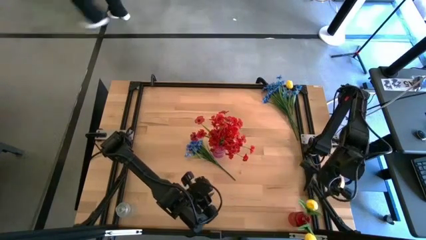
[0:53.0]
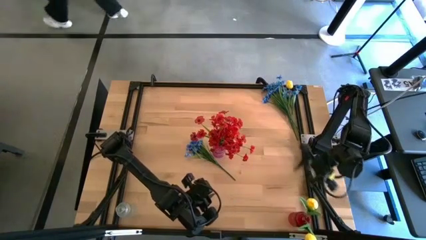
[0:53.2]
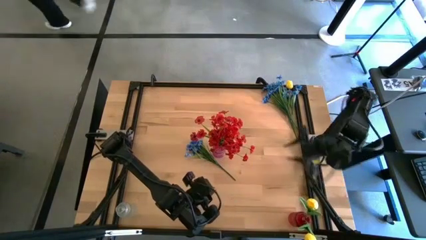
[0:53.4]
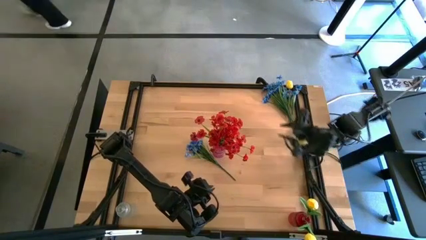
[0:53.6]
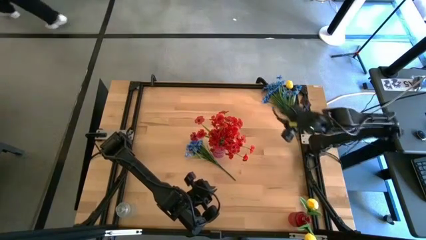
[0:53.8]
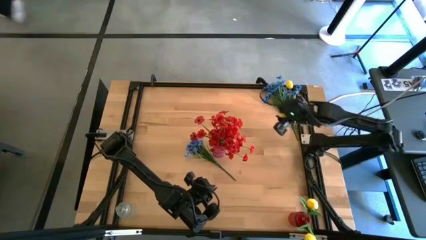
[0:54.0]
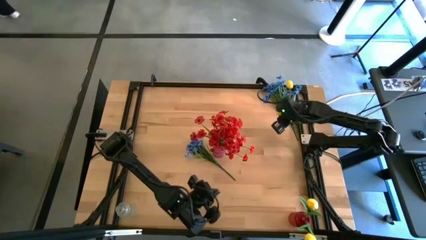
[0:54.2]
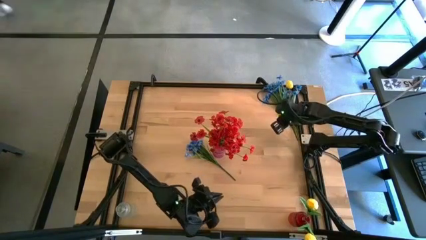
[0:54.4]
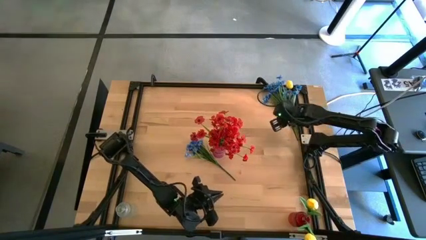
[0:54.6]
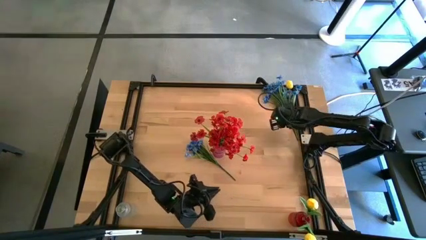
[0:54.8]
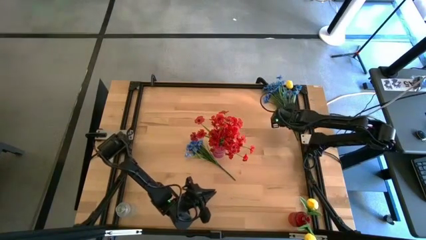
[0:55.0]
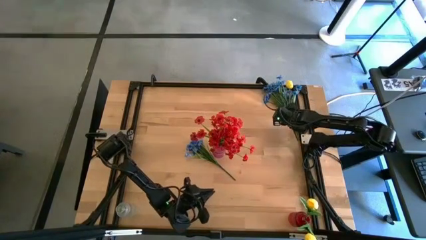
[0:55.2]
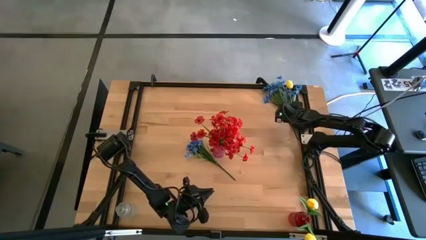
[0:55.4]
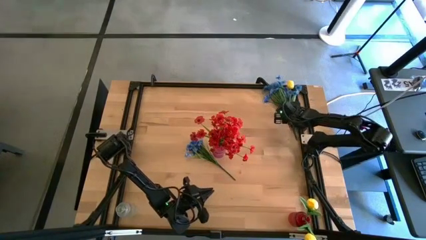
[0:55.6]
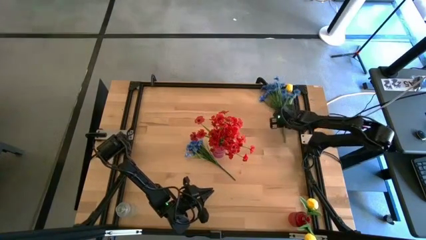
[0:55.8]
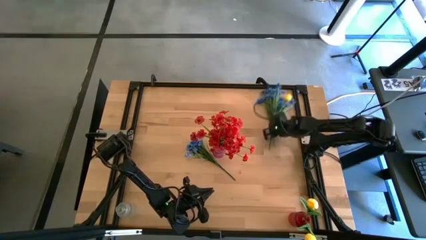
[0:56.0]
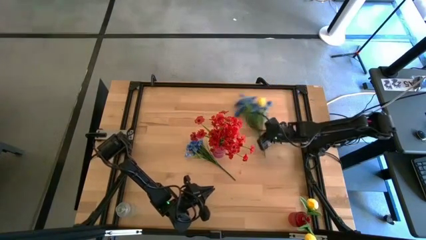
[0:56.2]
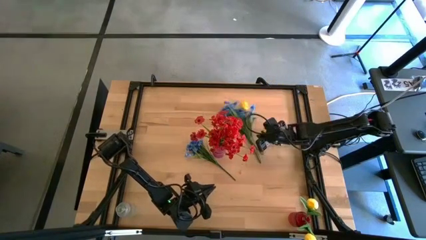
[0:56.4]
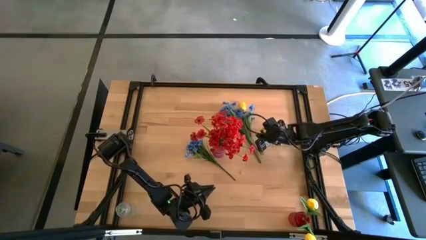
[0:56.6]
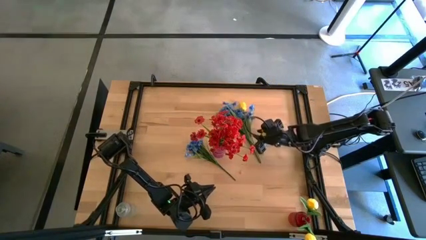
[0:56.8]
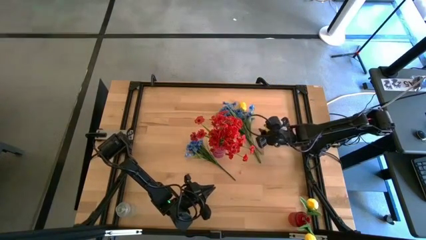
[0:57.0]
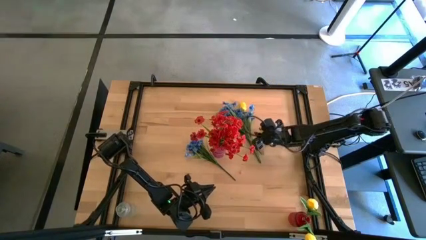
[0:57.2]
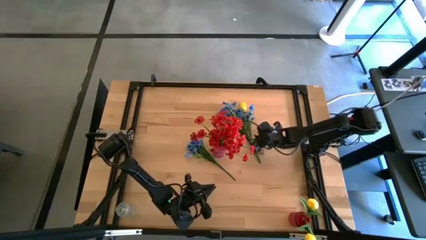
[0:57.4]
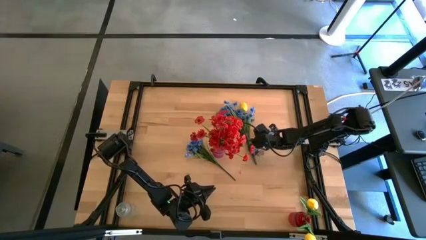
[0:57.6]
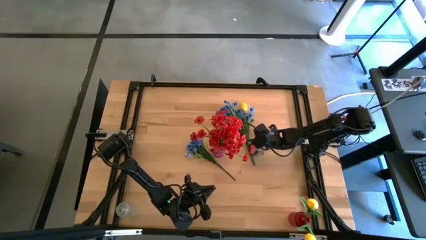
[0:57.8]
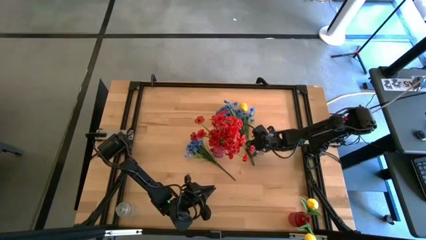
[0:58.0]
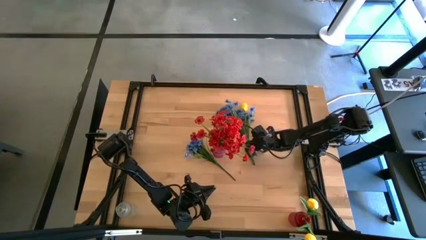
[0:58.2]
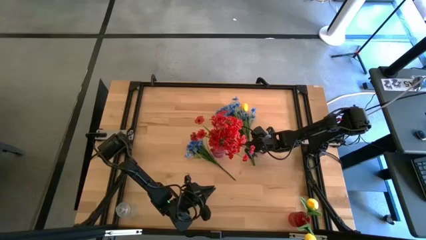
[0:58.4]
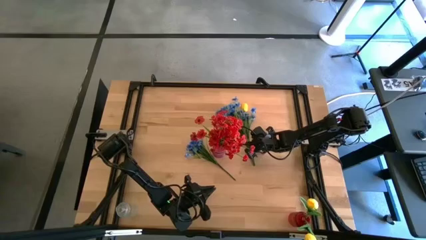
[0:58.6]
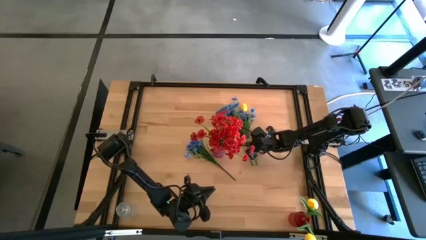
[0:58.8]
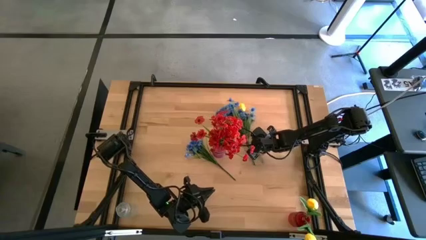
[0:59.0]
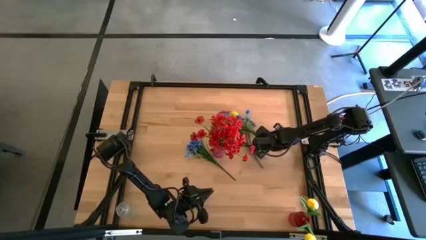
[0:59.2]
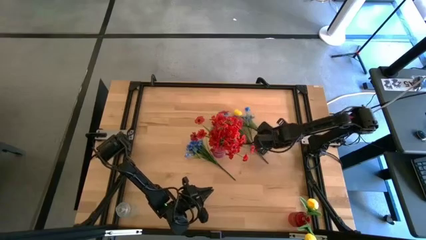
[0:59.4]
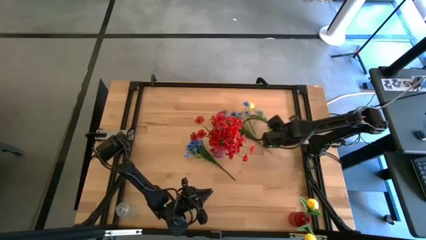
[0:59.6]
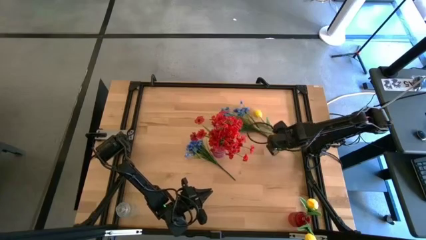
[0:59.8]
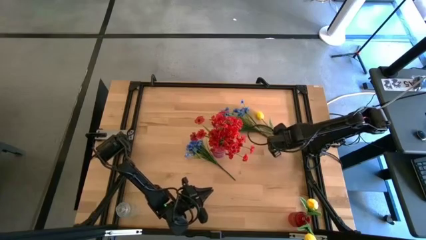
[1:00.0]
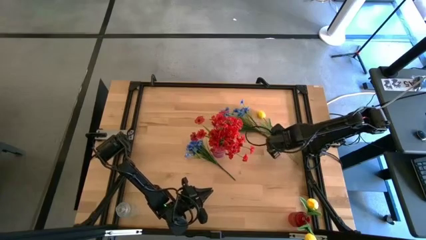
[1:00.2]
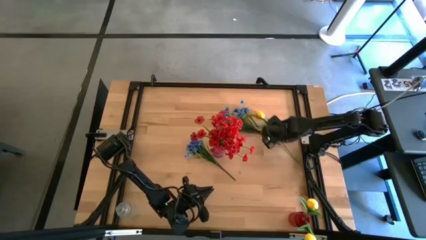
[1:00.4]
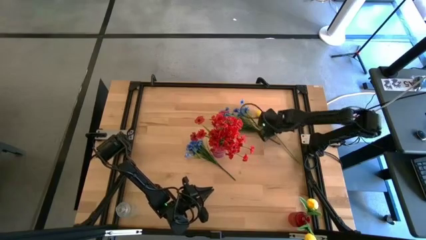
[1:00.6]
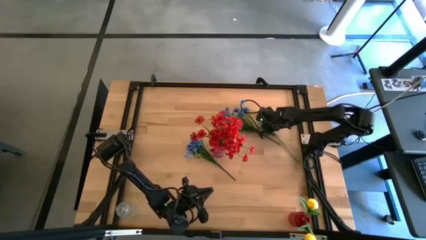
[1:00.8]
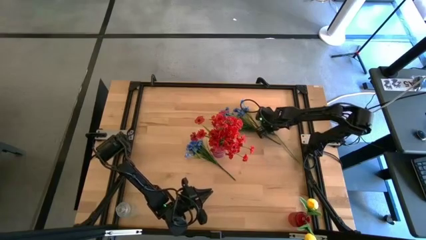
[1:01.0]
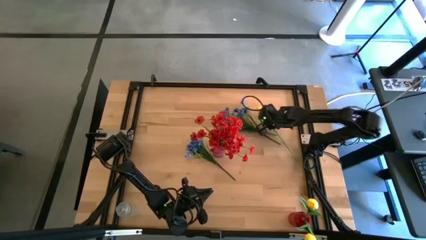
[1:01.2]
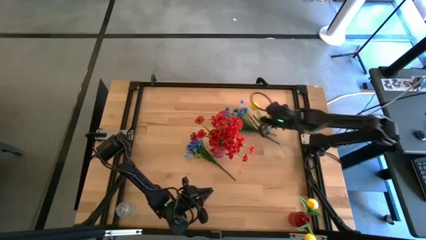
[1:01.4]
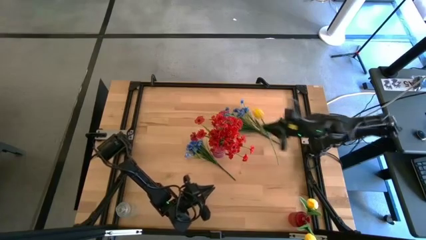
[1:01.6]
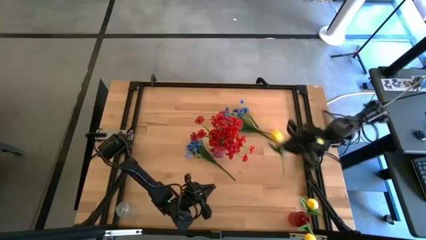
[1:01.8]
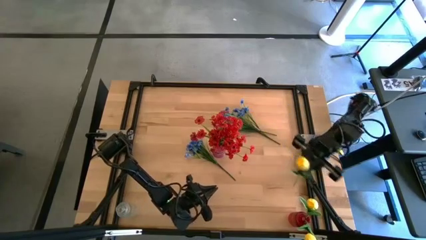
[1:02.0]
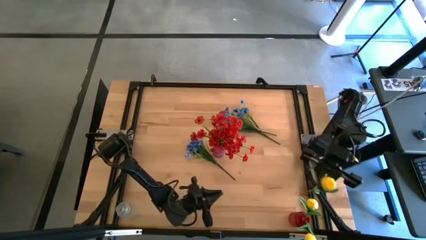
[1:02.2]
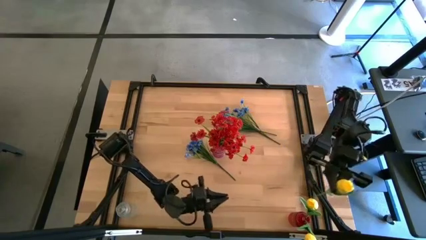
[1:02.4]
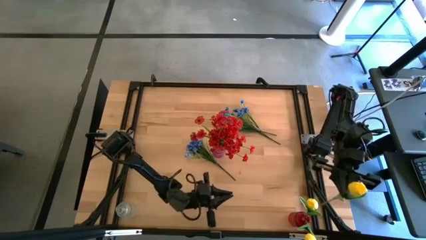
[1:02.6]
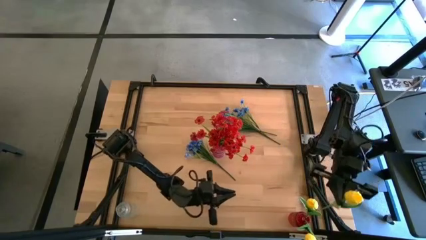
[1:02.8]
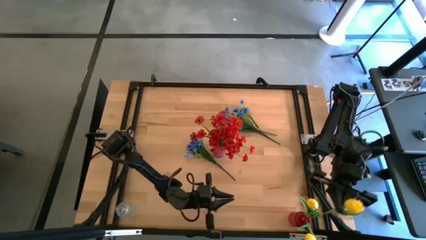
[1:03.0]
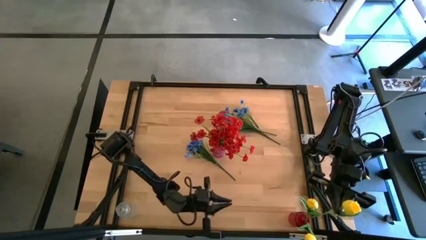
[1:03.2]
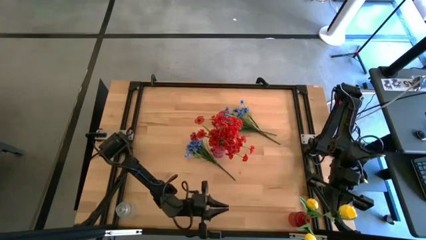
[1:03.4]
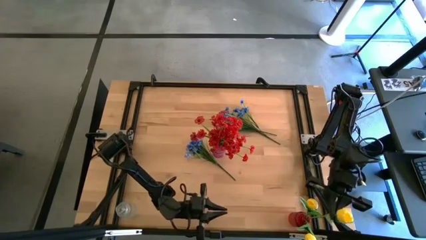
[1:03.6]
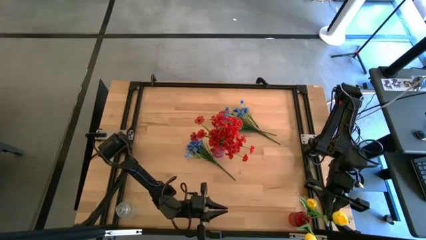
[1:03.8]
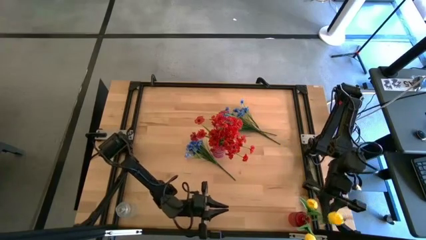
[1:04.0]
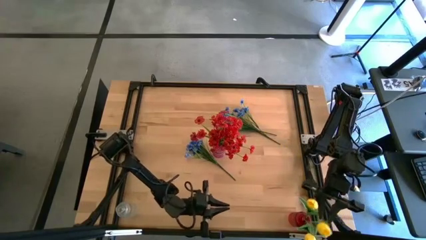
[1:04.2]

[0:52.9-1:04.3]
Task: Sort flowers into vase by color
Put the yellow tulip into the red vase

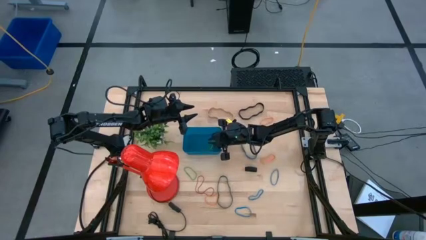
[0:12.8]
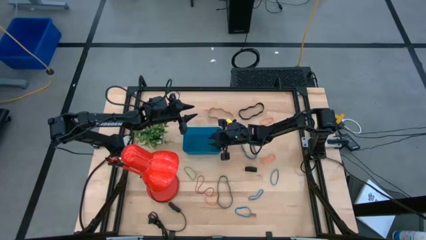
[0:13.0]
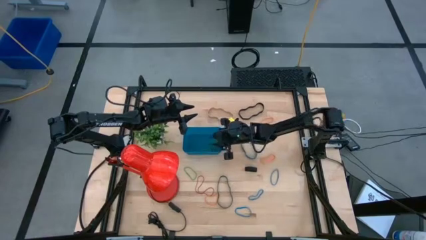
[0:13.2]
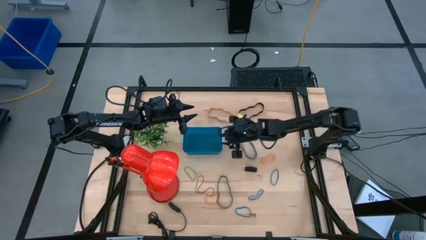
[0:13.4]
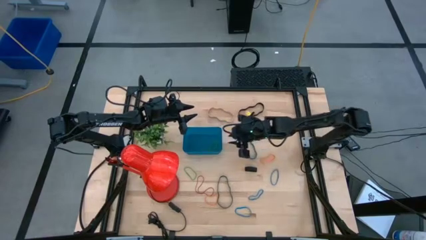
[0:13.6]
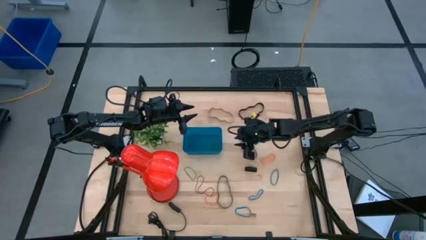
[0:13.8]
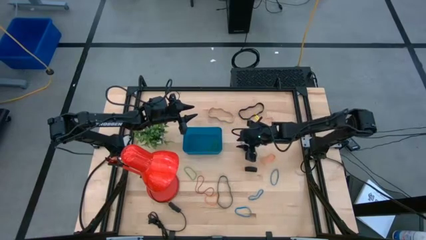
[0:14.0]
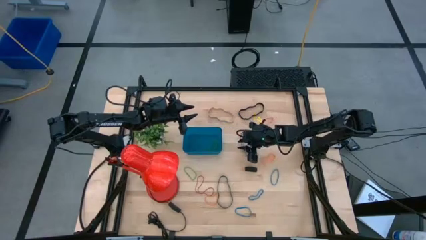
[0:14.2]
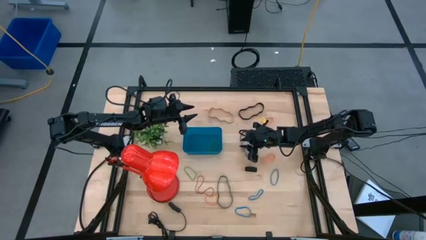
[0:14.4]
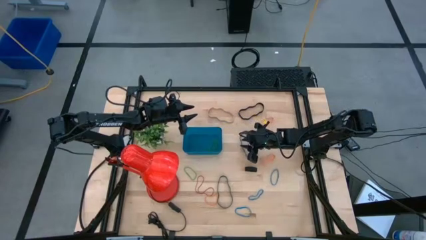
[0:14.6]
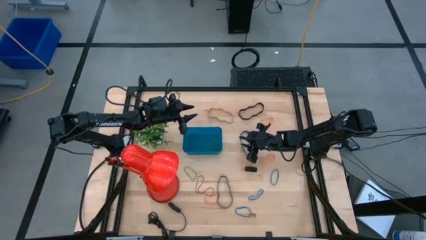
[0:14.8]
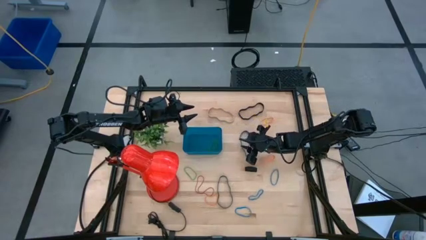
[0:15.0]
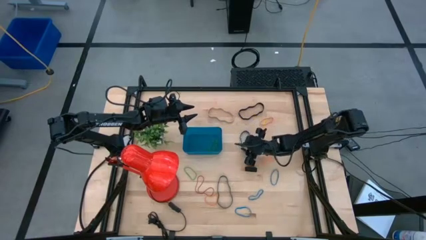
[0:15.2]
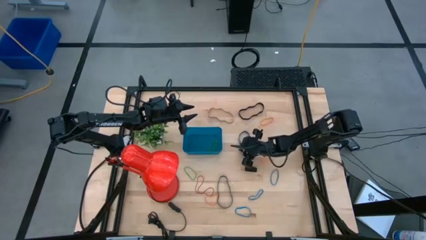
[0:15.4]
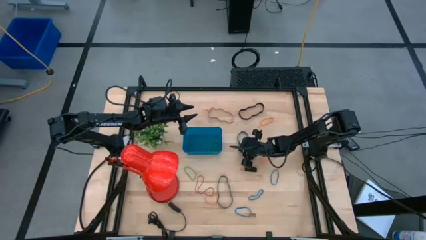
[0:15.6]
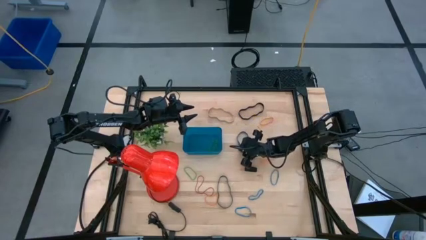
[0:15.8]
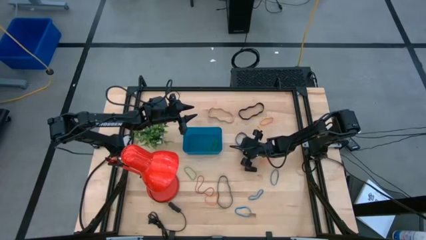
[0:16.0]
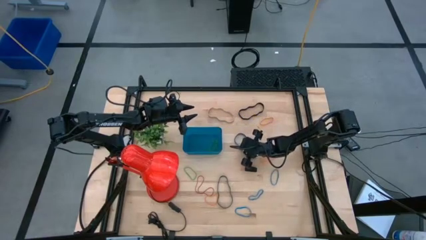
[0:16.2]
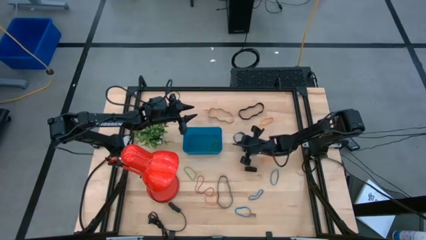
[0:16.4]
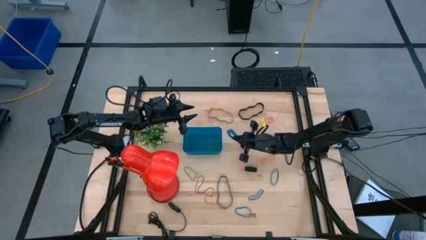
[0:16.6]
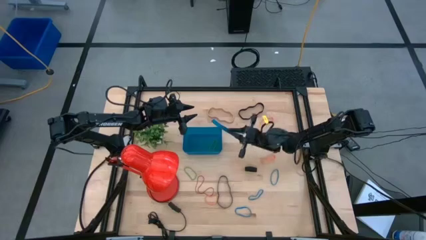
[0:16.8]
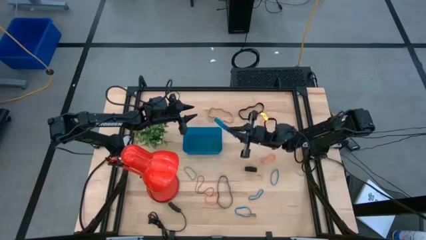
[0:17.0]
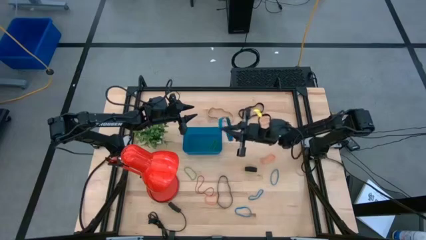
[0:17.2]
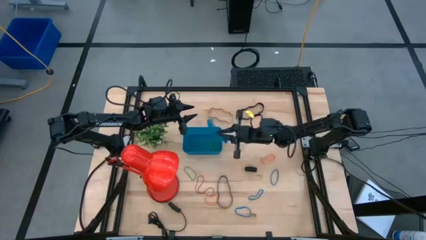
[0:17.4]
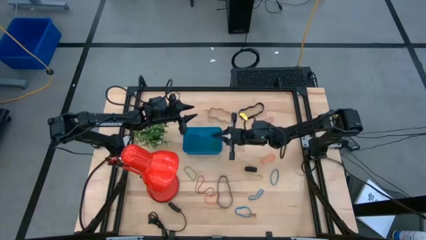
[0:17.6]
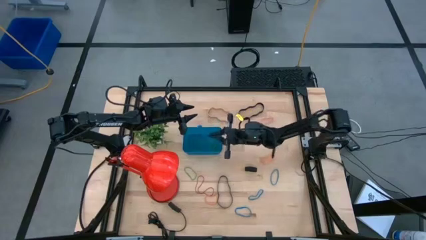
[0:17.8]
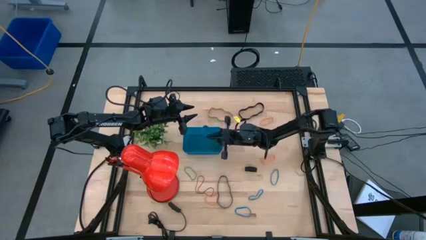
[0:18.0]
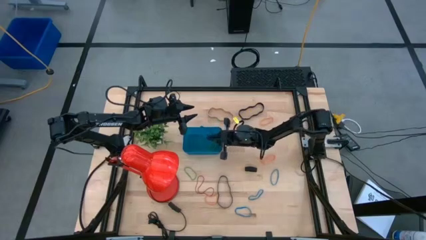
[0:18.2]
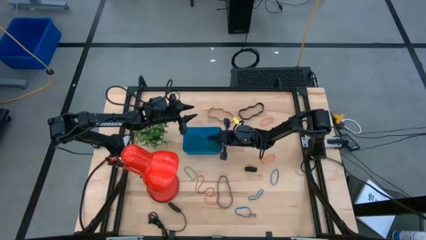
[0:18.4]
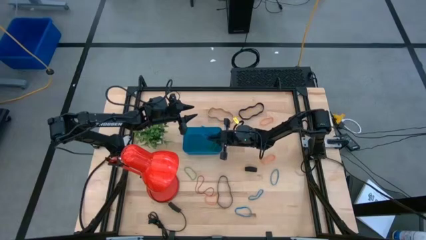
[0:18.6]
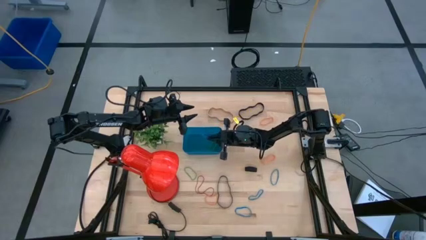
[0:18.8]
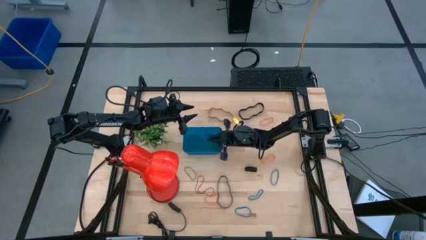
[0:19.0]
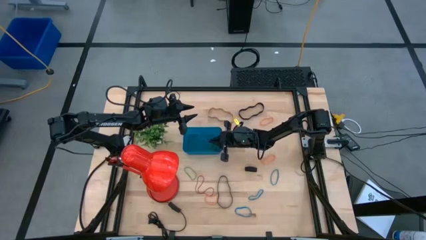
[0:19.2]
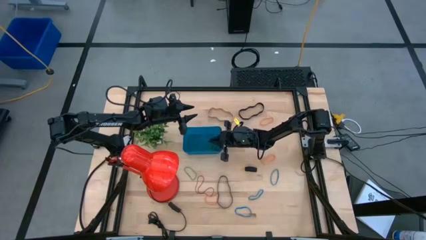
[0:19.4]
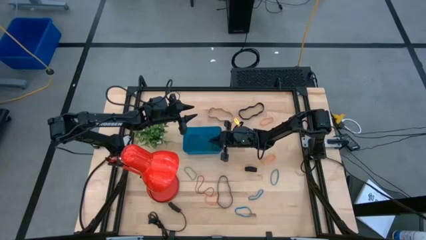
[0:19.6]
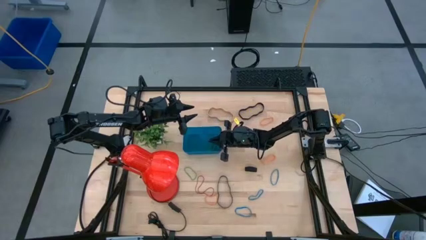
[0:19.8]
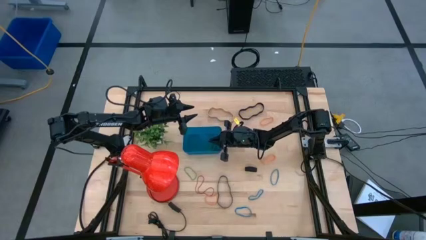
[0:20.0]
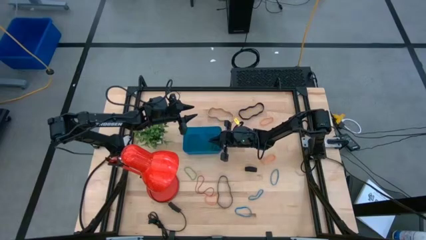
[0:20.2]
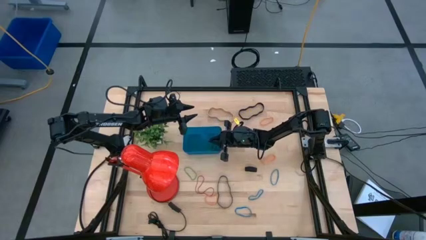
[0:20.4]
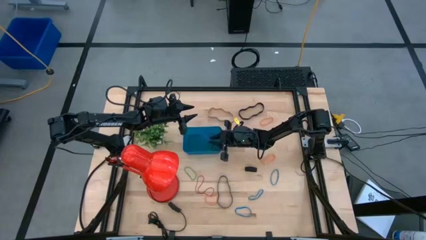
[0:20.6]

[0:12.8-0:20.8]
Task: Pick and place rubber bands into bin
Put the blue rubber band into the blue bin
